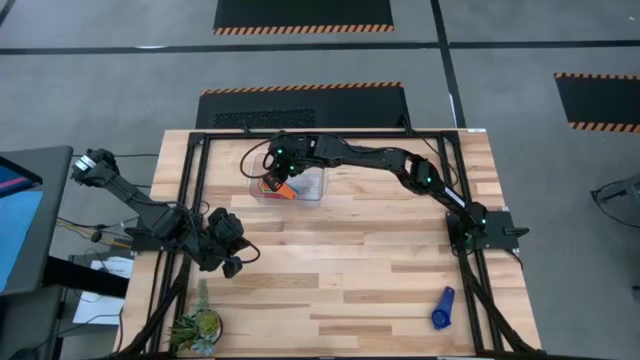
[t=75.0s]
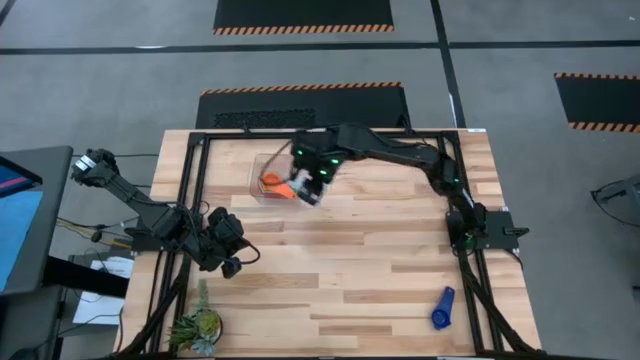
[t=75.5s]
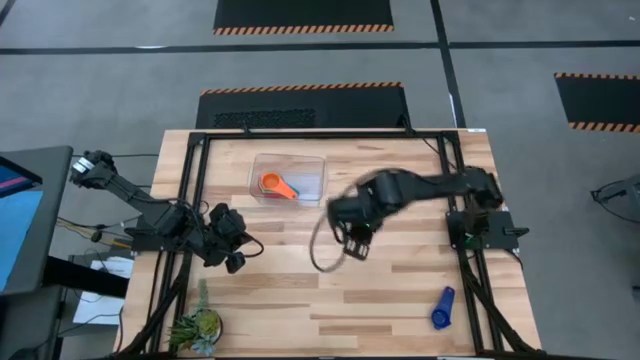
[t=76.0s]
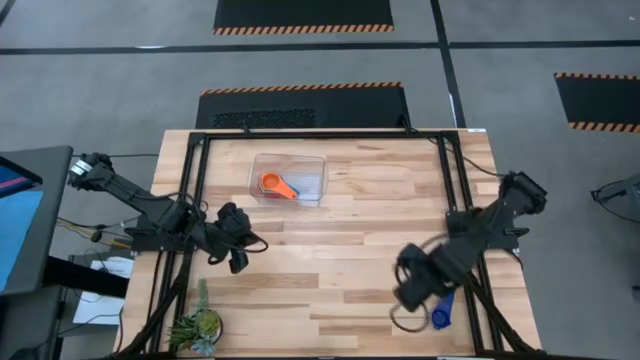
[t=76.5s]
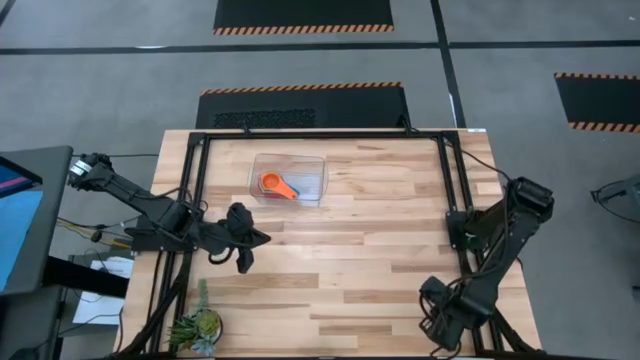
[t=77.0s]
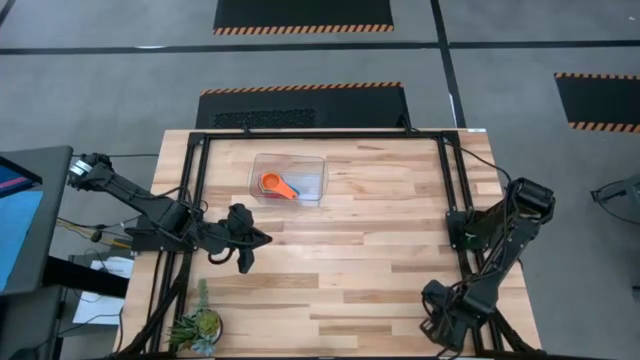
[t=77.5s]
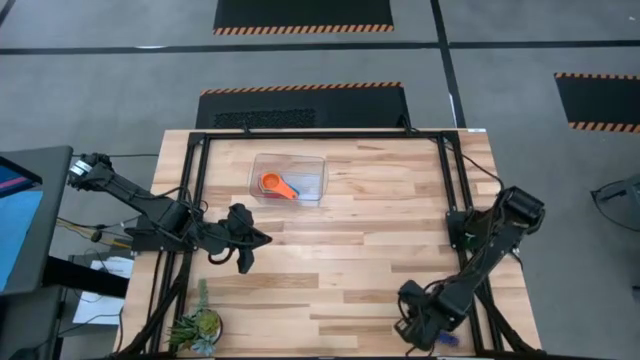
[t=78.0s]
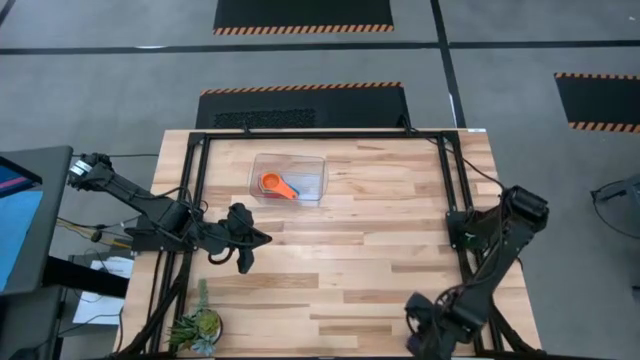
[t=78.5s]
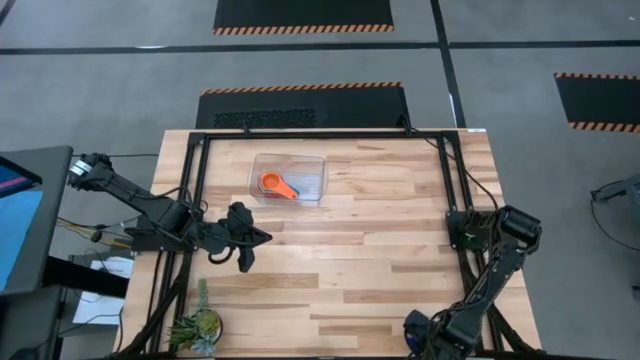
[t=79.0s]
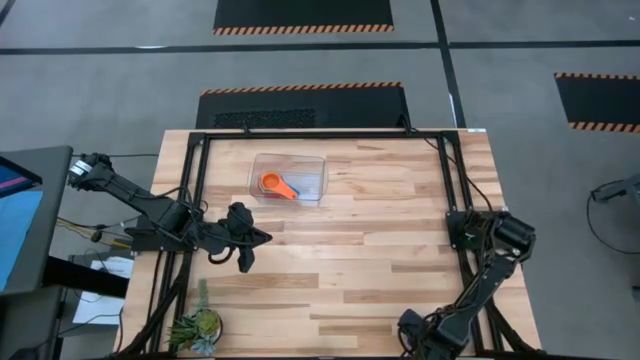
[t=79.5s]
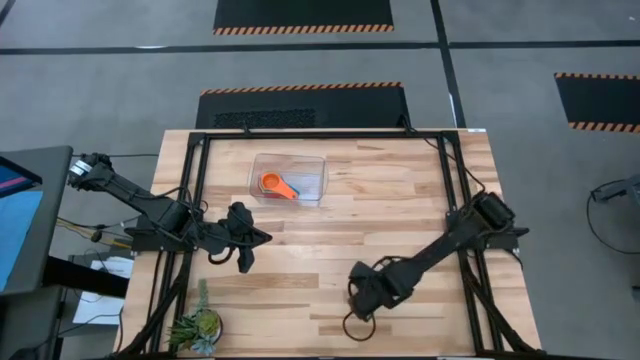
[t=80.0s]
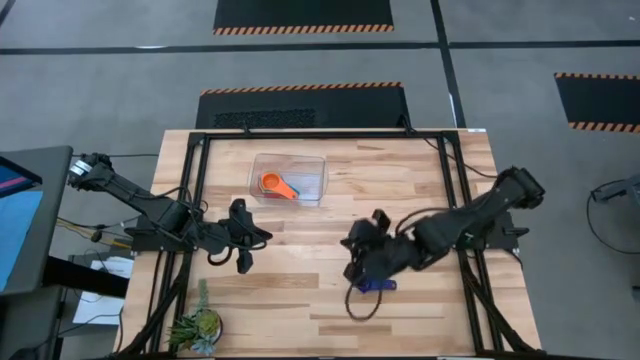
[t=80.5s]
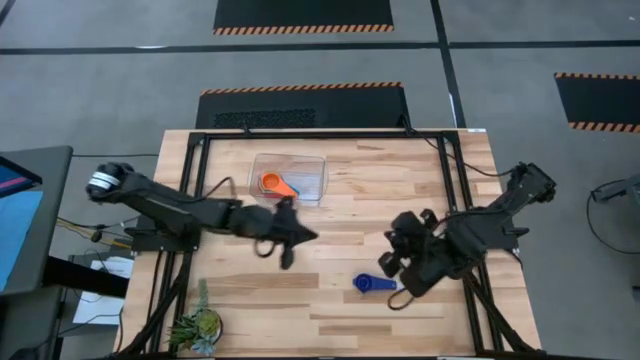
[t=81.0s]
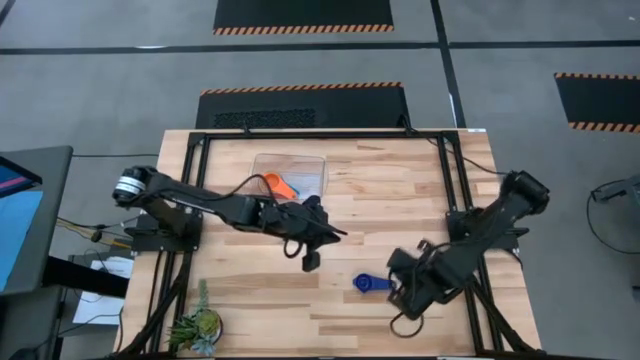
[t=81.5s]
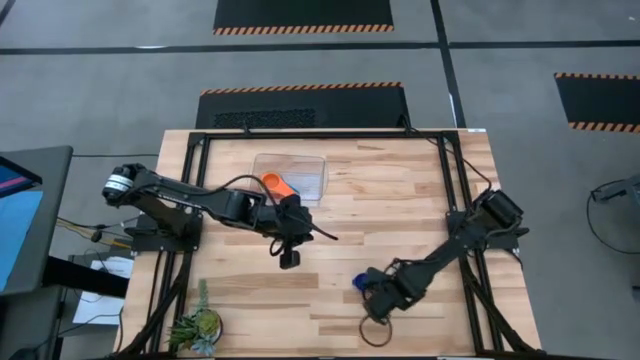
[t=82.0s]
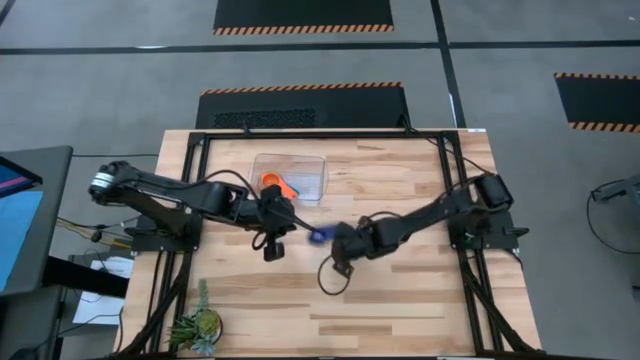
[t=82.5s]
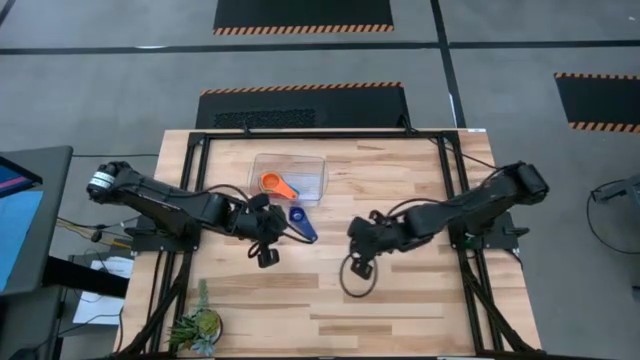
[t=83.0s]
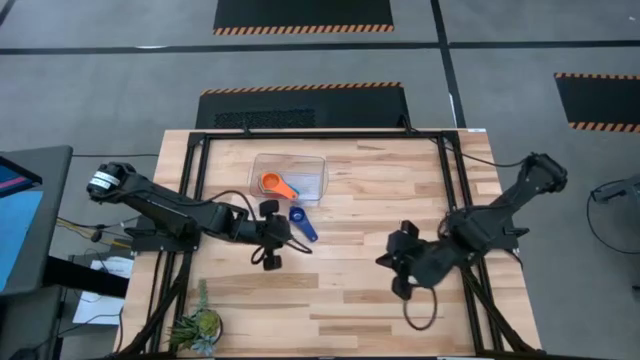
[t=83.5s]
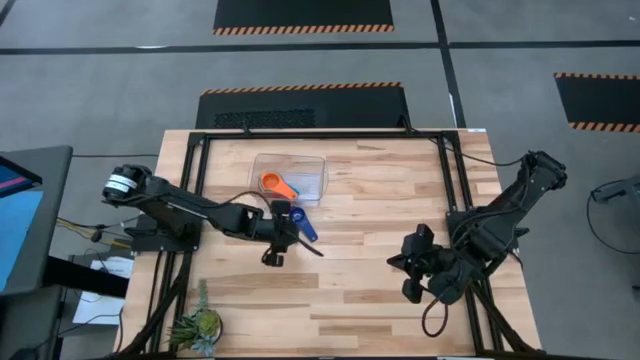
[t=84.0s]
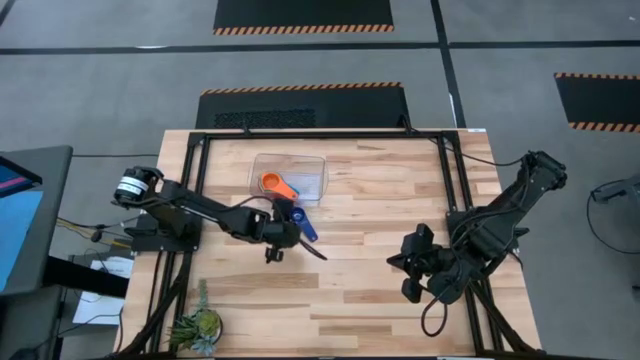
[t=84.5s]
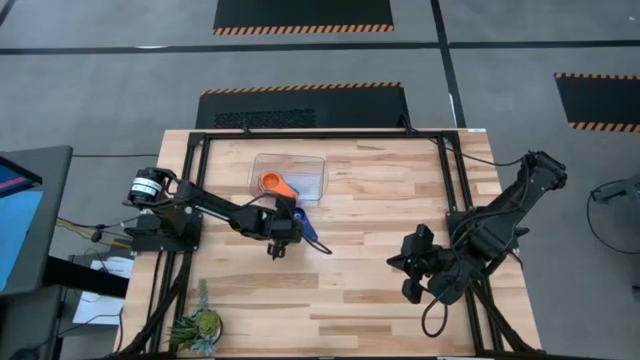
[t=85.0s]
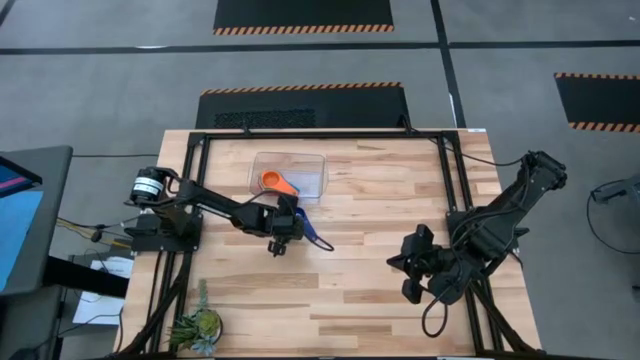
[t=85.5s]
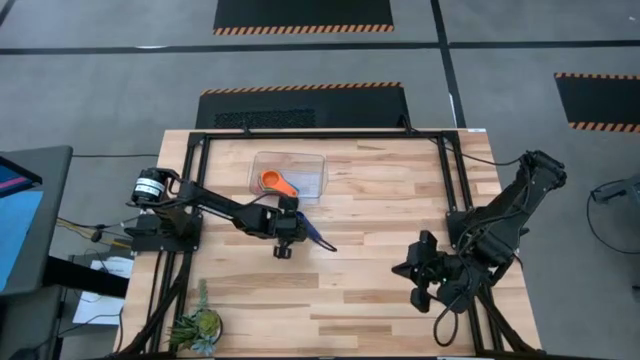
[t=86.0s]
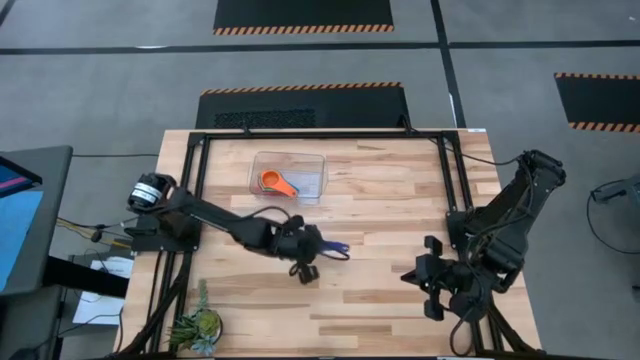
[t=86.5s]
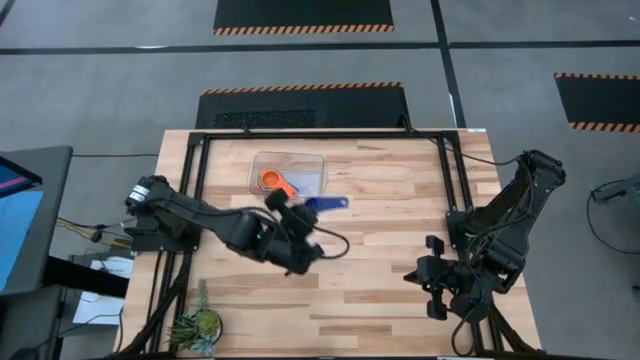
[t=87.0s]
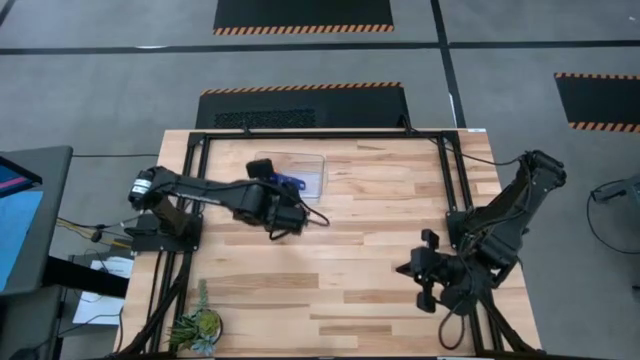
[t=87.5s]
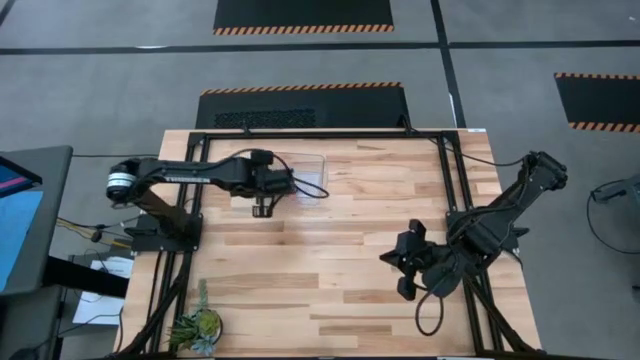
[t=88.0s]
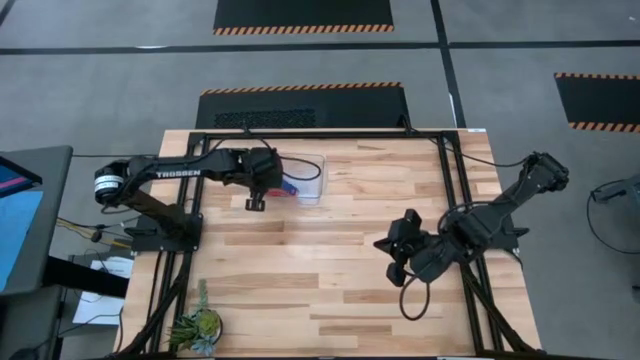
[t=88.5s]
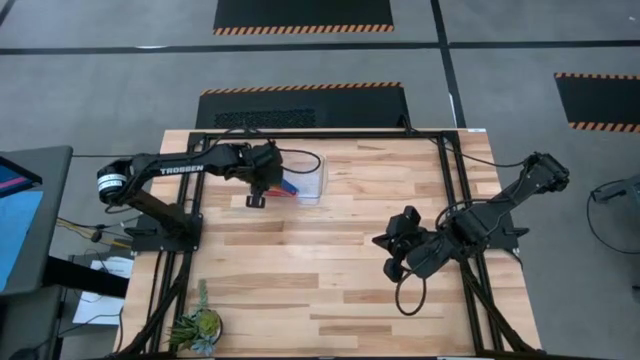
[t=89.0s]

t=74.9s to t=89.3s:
Task: Nest measuring cups in basket
Stack the dark blue measuring cup on top of the orange measuring cup in the transparent bin

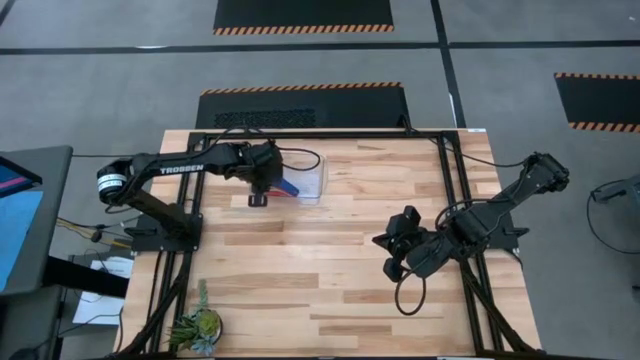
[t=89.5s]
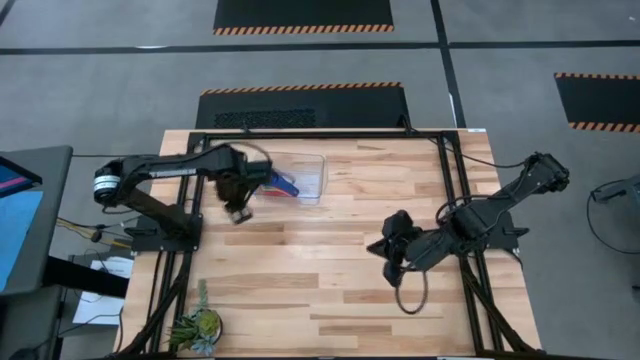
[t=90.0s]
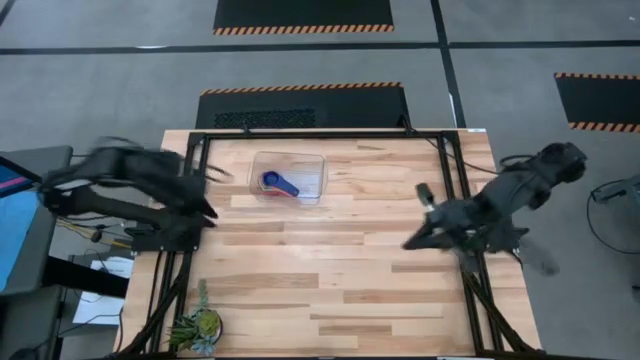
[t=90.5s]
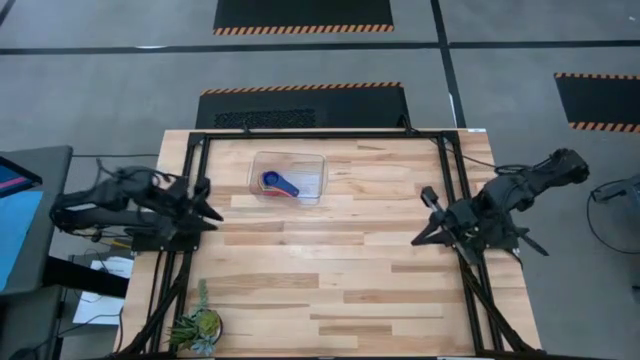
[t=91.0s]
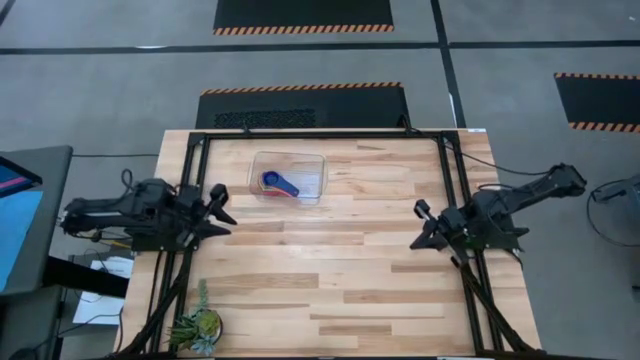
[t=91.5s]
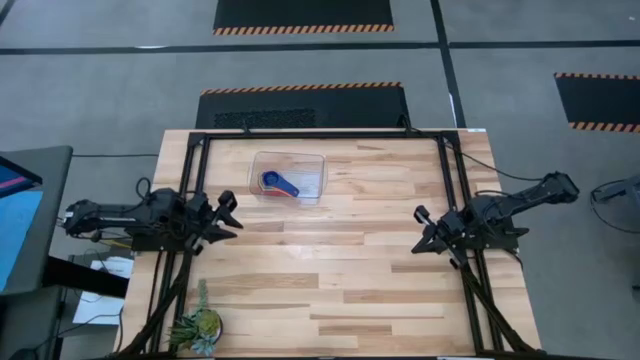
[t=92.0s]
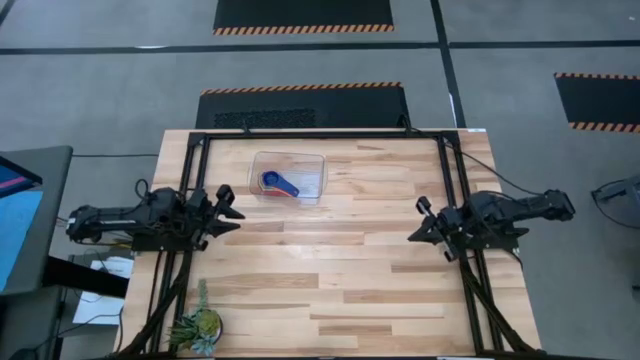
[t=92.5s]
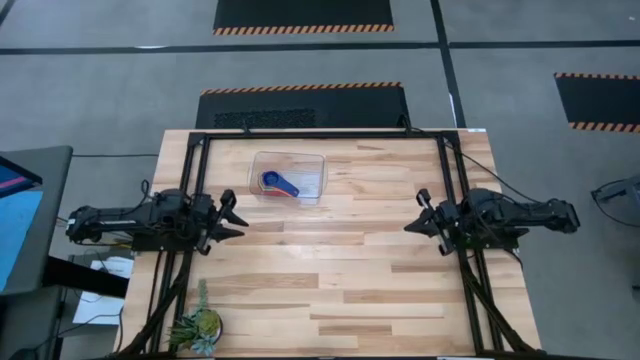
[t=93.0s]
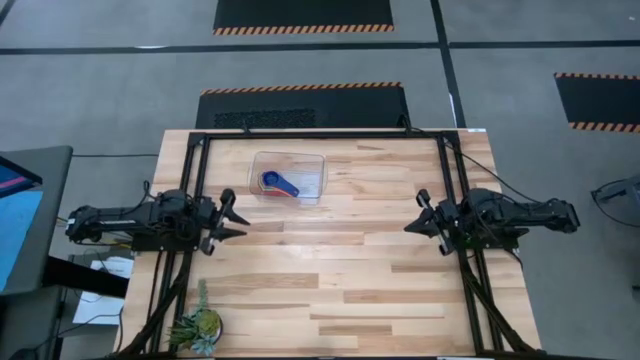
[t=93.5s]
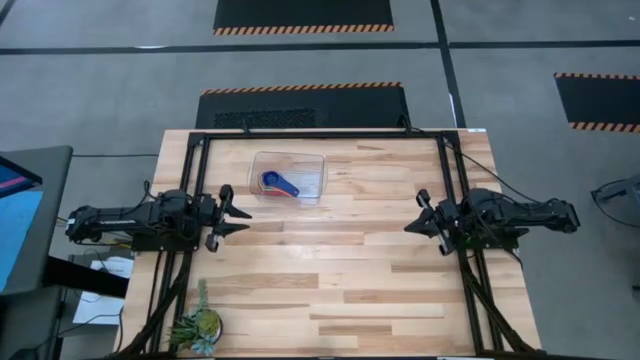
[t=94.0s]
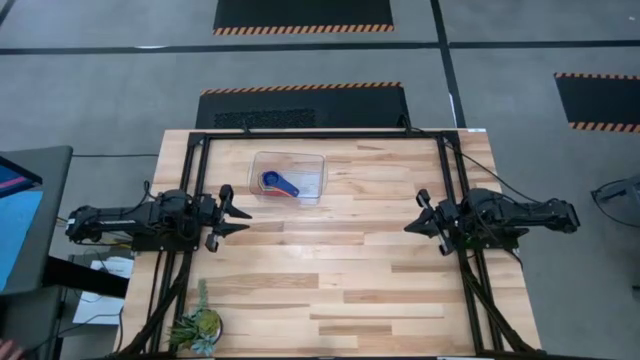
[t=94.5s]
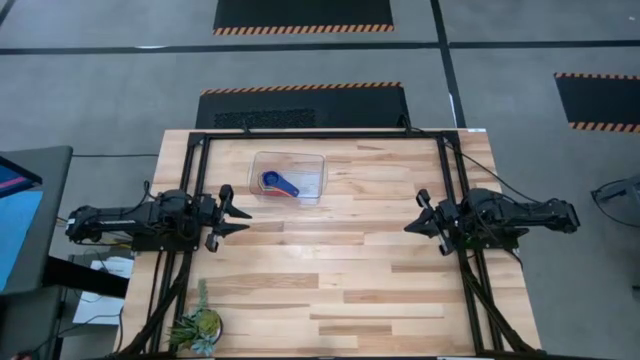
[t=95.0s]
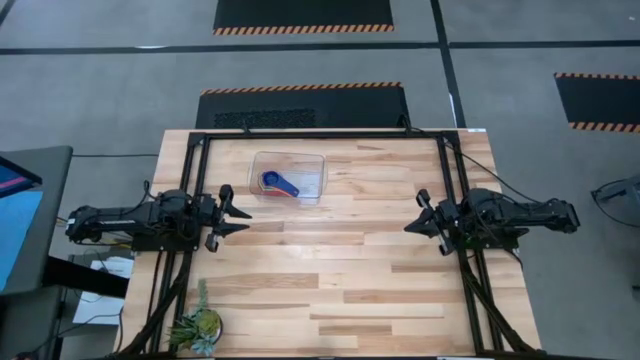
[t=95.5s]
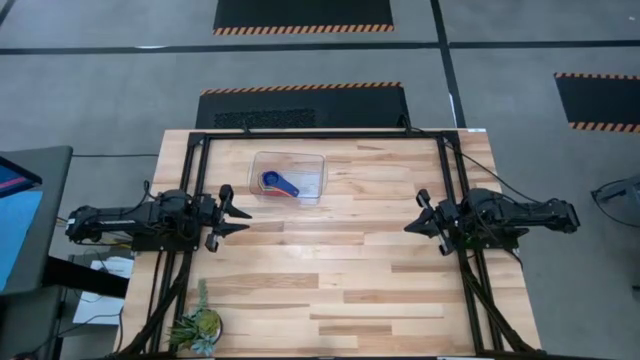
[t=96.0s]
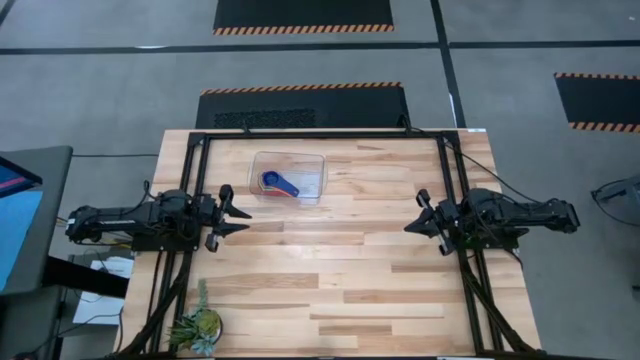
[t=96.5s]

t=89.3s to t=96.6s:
Return to Home Position
